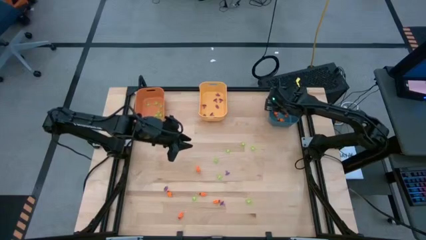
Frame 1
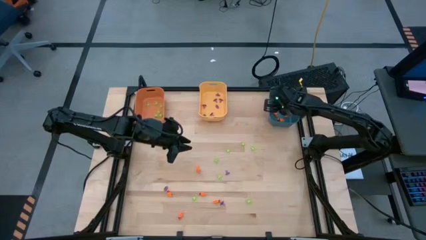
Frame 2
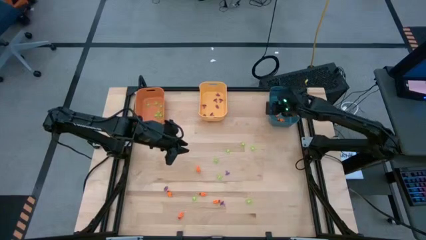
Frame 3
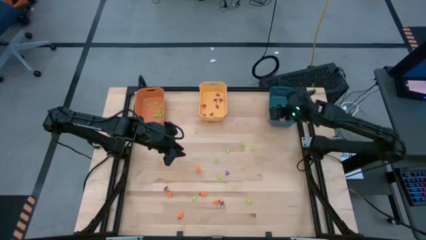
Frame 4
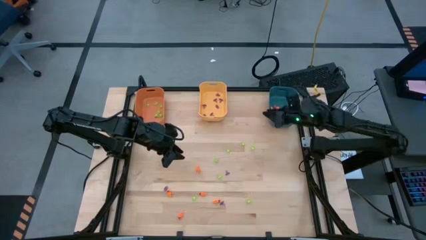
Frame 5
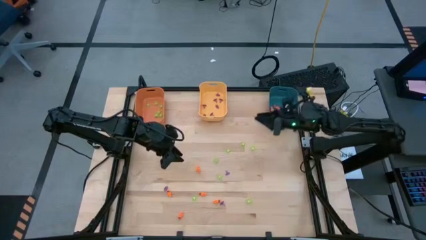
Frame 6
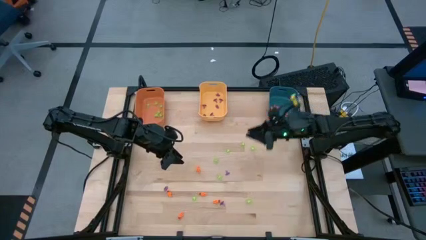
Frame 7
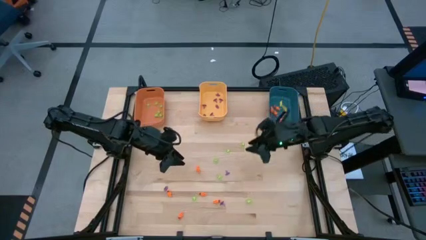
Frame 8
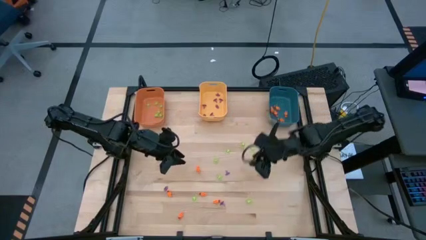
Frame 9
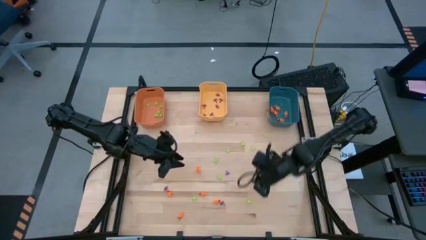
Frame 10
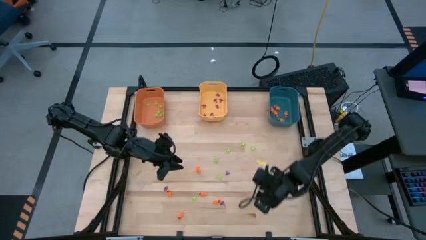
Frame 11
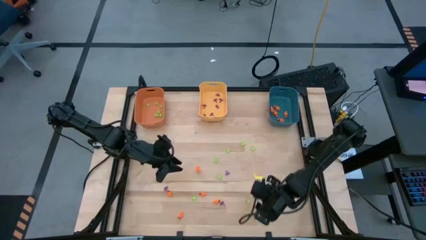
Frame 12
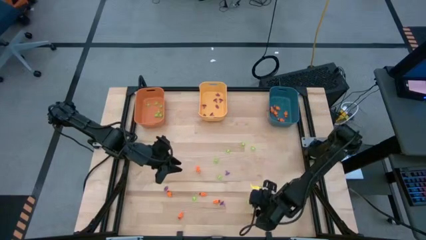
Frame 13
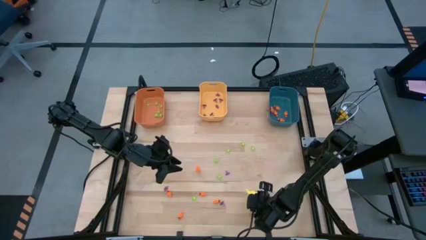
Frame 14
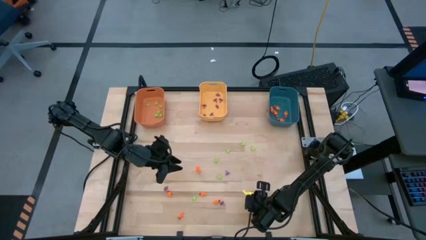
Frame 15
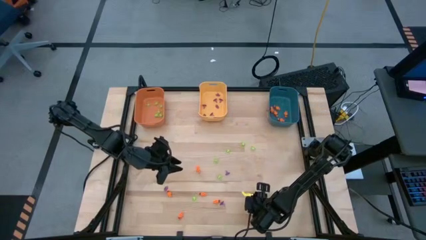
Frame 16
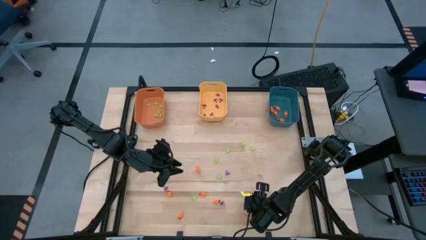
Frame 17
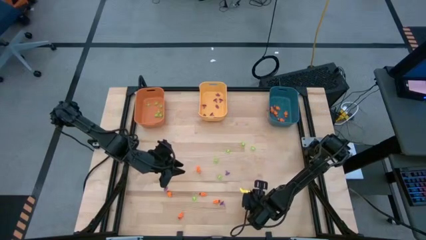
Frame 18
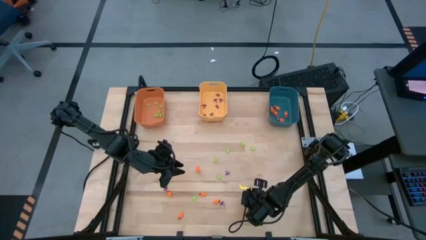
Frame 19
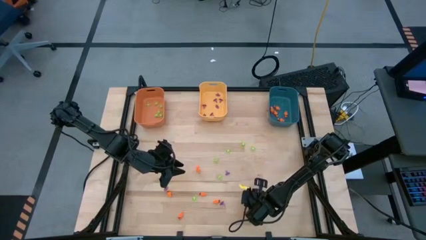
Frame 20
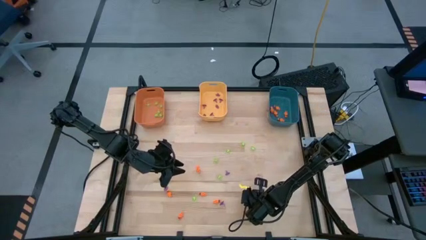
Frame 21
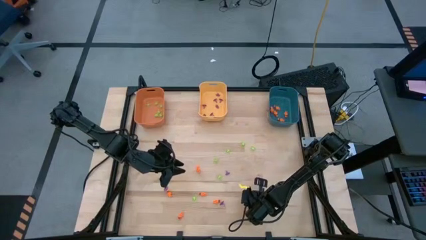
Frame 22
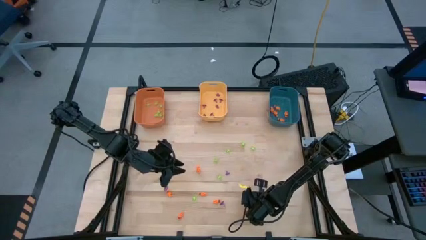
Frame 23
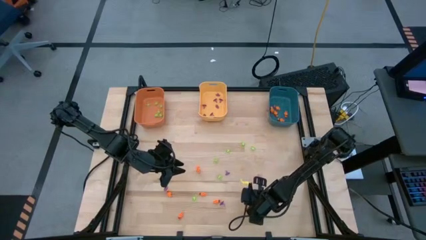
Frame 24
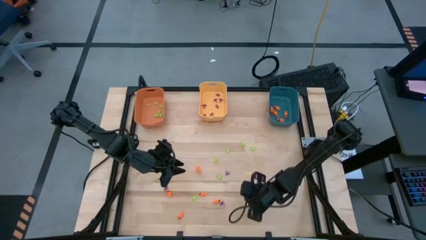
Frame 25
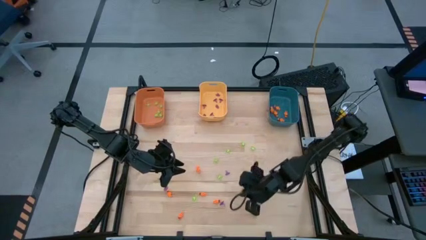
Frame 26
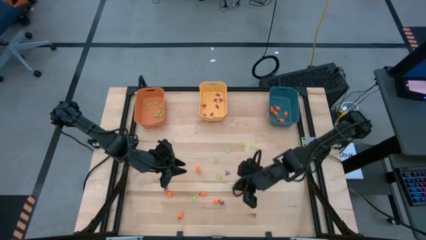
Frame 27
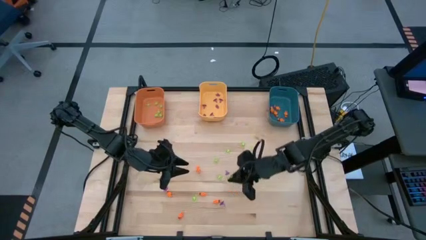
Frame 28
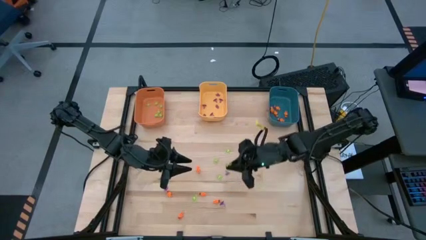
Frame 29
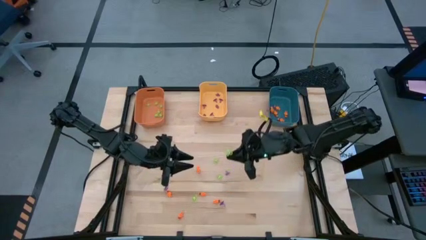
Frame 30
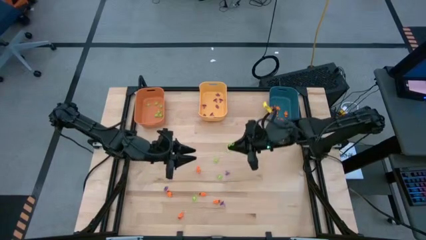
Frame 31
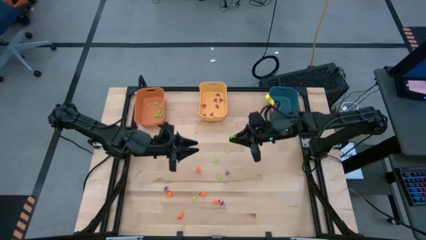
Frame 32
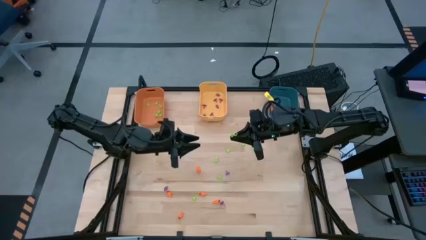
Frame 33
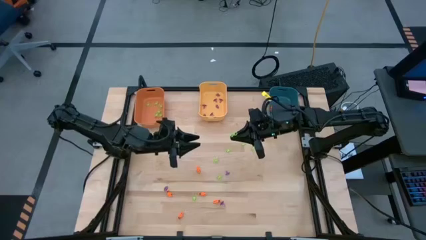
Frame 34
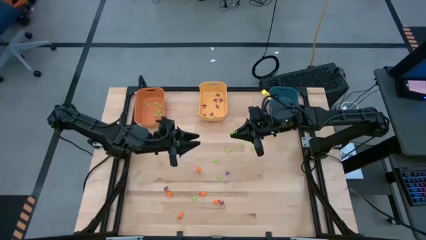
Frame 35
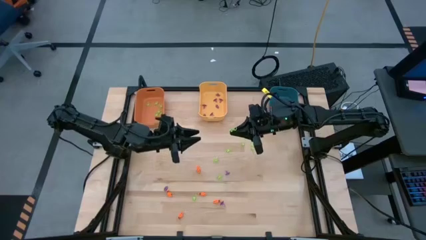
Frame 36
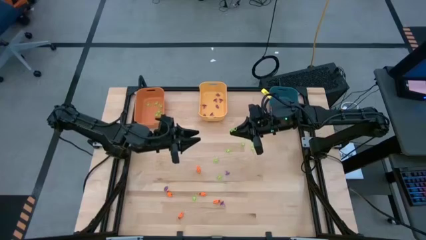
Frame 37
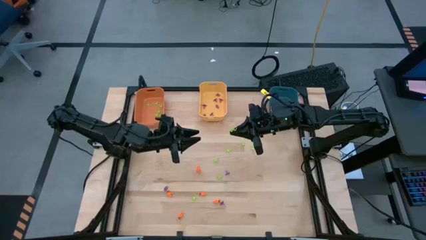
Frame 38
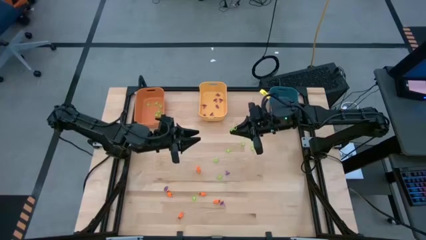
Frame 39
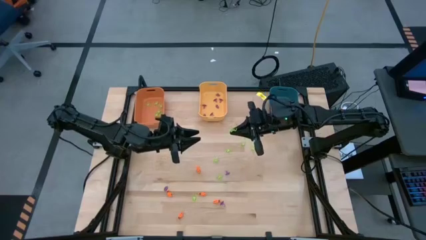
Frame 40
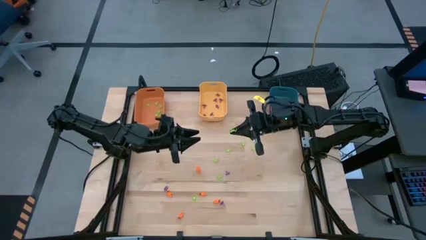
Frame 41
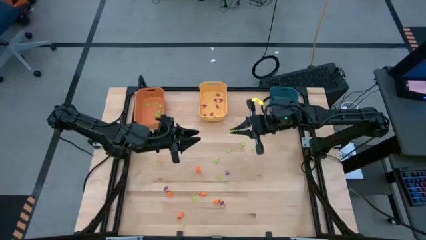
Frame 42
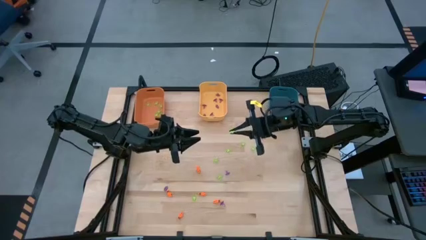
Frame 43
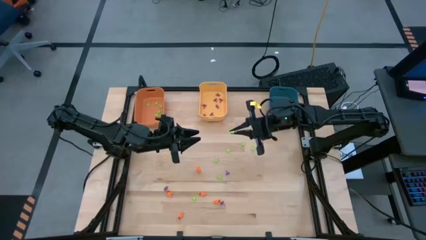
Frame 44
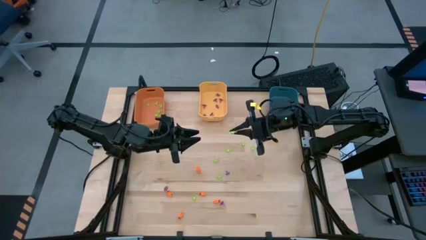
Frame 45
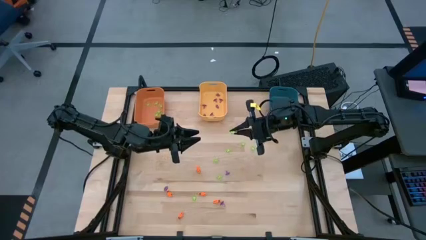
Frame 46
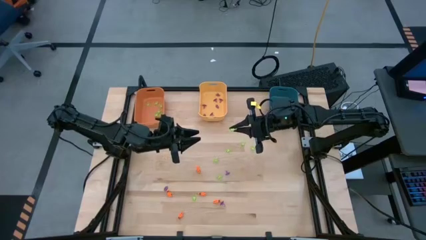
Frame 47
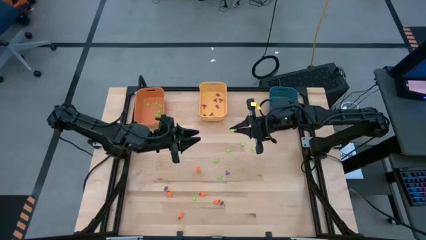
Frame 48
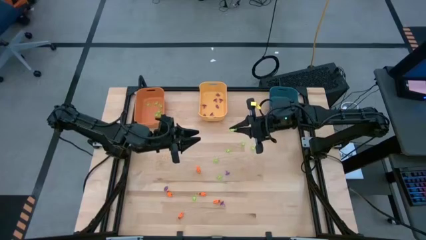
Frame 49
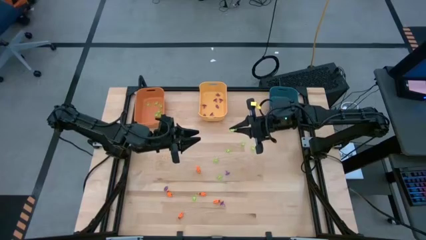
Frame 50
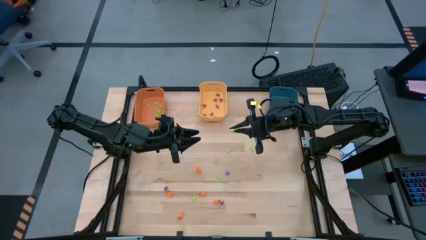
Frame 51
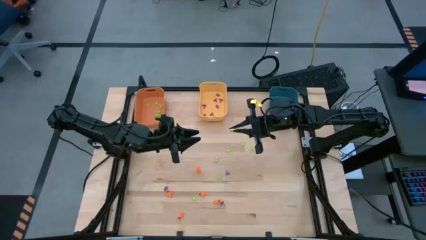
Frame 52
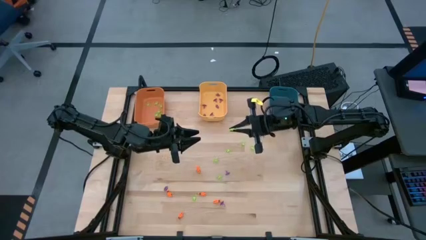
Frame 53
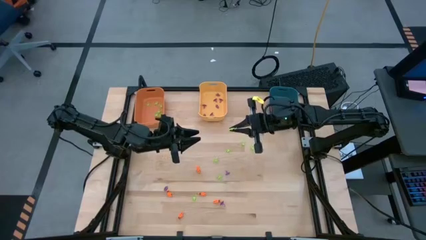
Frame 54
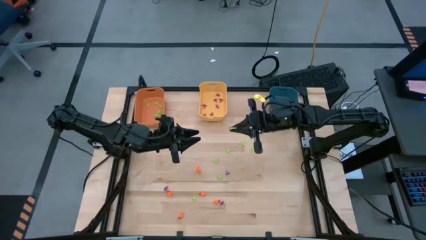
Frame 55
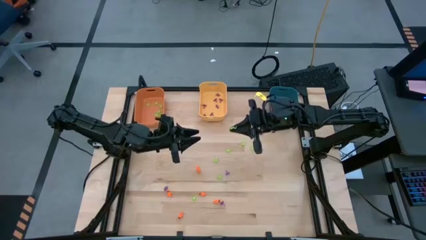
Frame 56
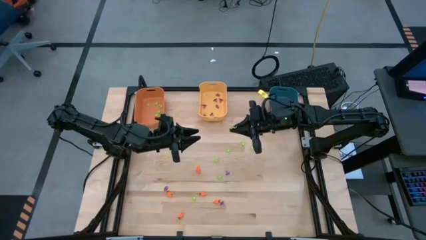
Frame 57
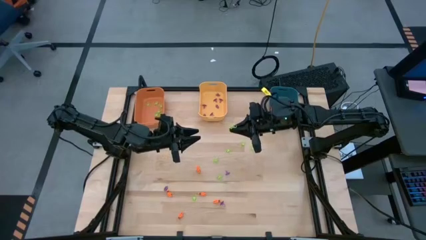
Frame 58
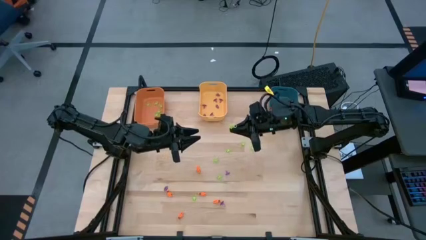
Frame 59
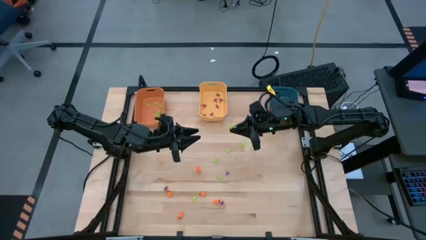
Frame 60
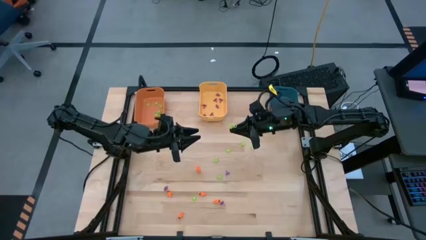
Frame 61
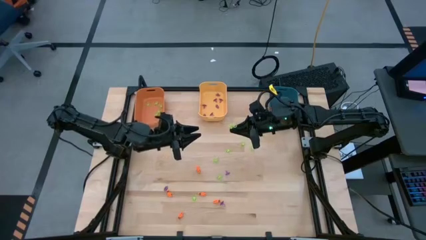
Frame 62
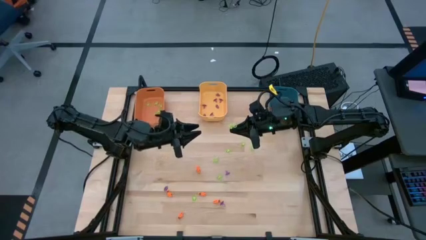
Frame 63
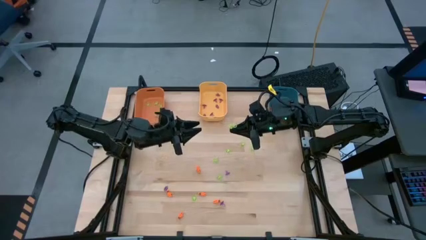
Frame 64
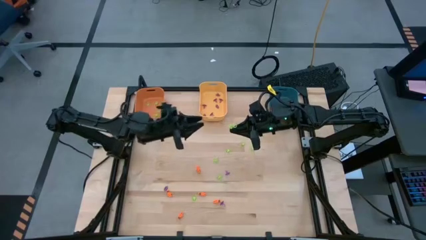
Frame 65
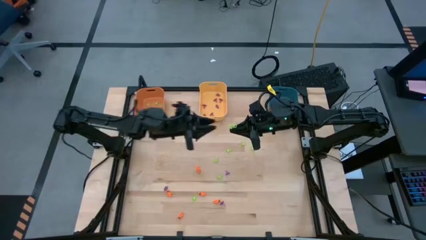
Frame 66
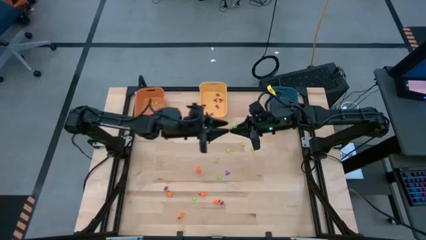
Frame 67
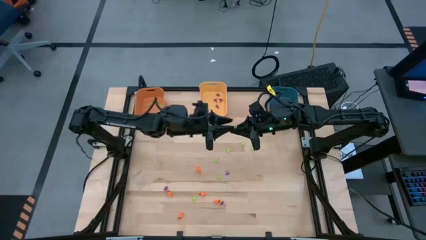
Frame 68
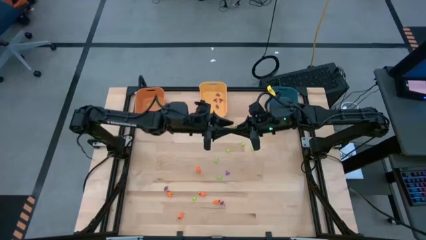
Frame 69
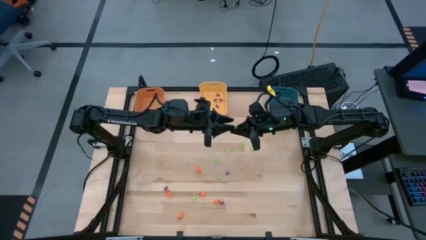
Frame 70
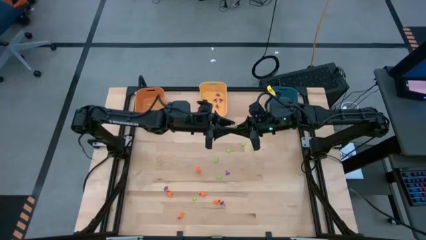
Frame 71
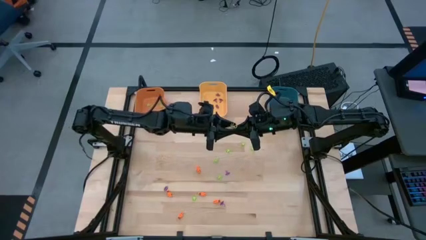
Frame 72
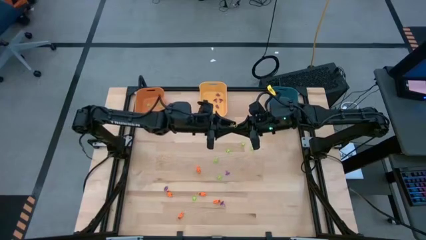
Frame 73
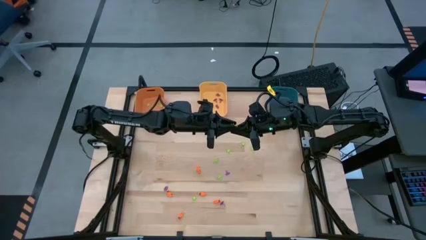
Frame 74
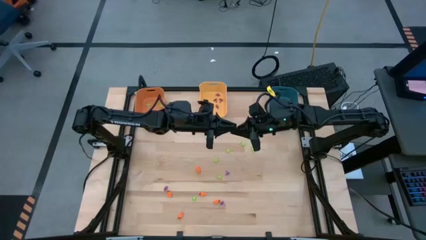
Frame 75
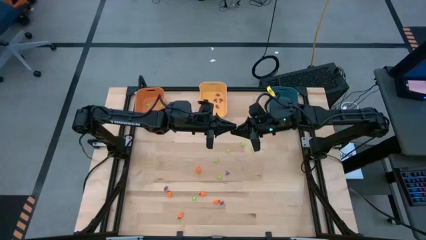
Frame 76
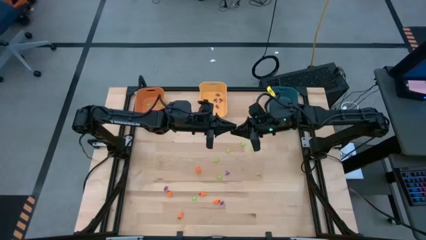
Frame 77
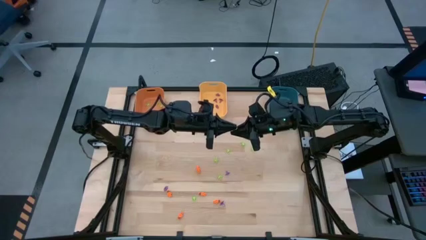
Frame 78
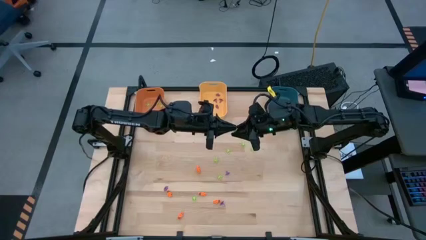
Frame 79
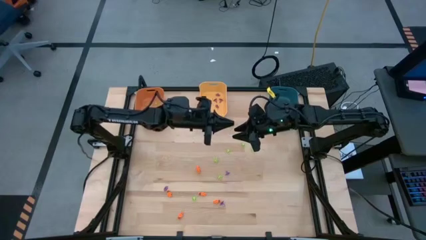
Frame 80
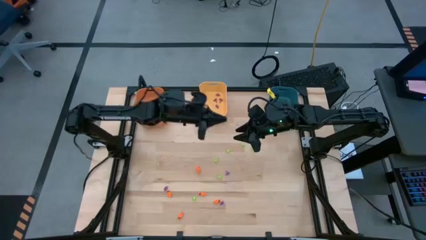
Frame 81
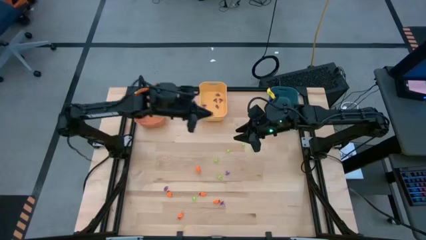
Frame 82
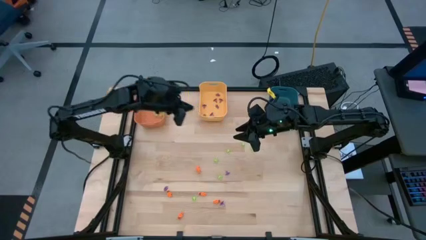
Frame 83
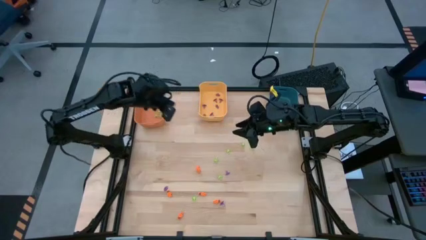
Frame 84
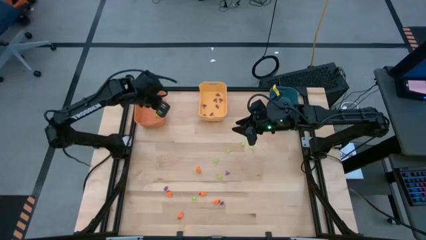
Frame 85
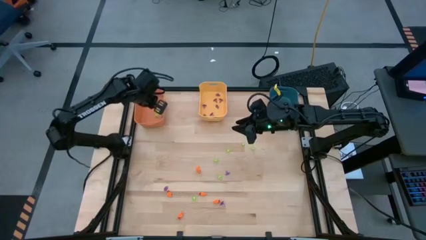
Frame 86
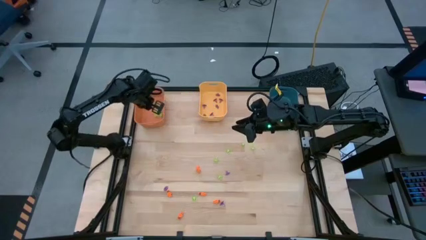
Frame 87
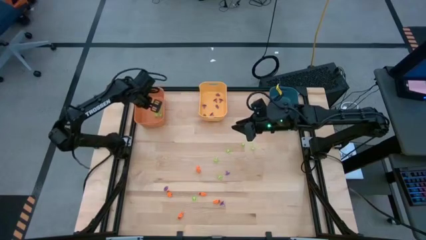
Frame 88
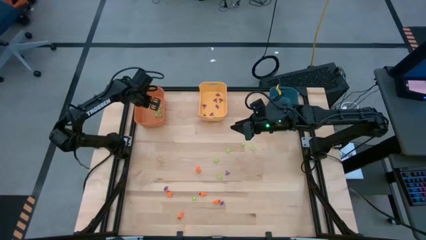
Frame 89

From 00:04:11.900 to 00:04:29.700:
Task: Sort Halloween decoration
Put the green spider toy into the orange bin
